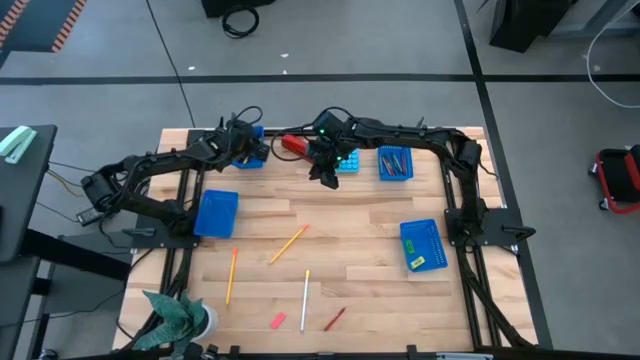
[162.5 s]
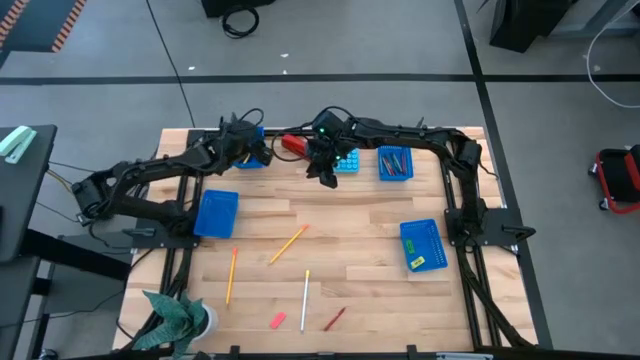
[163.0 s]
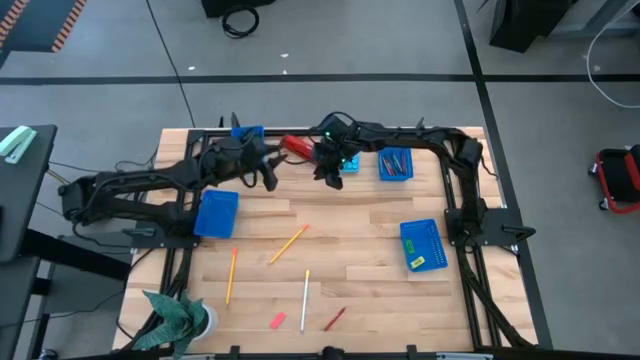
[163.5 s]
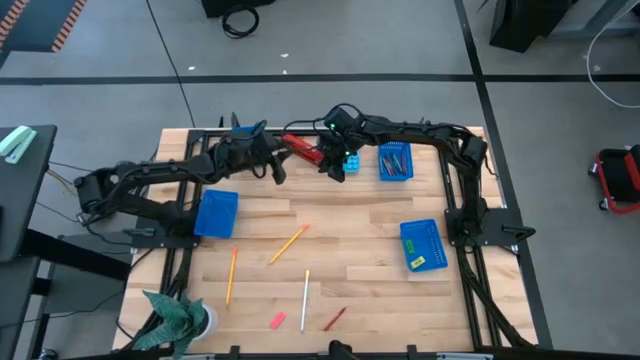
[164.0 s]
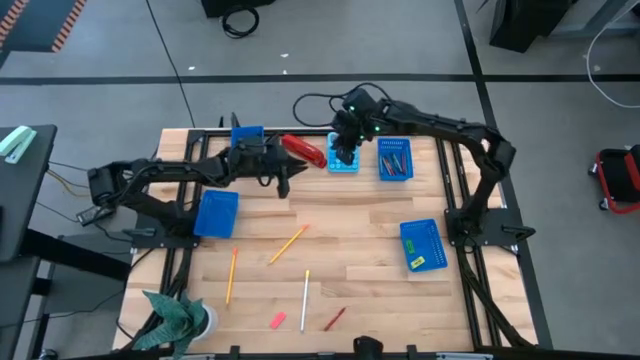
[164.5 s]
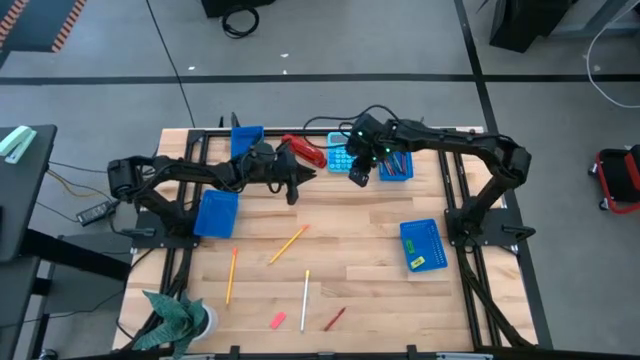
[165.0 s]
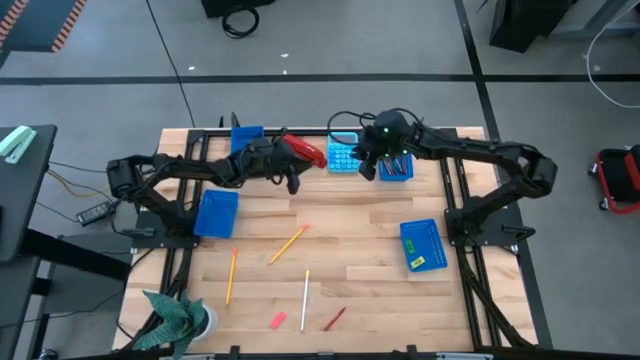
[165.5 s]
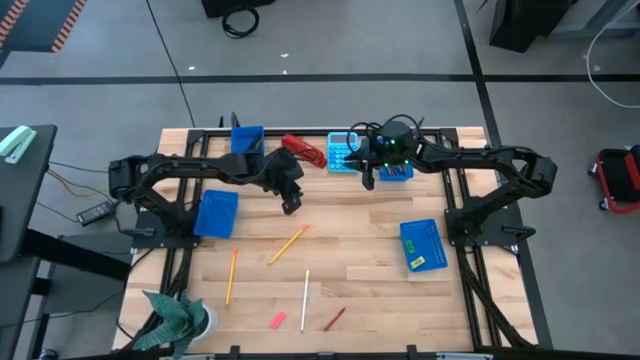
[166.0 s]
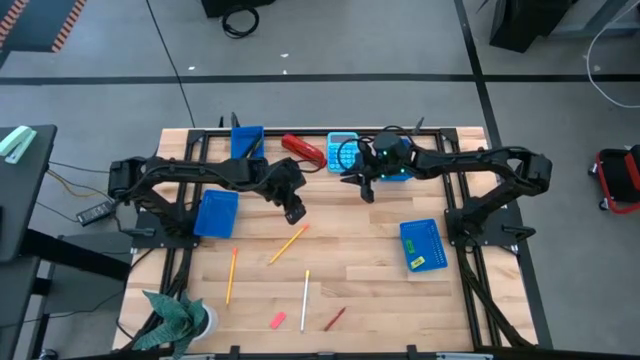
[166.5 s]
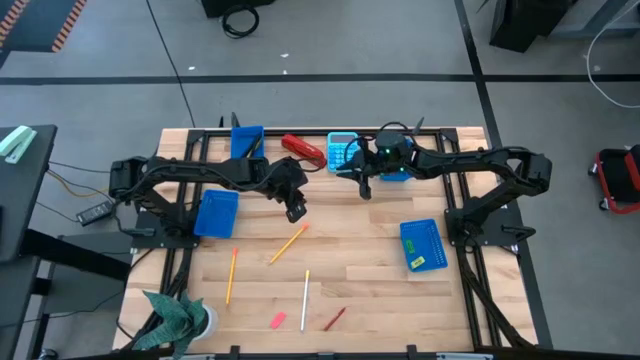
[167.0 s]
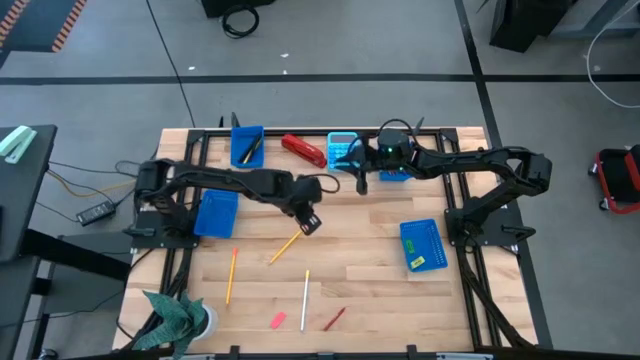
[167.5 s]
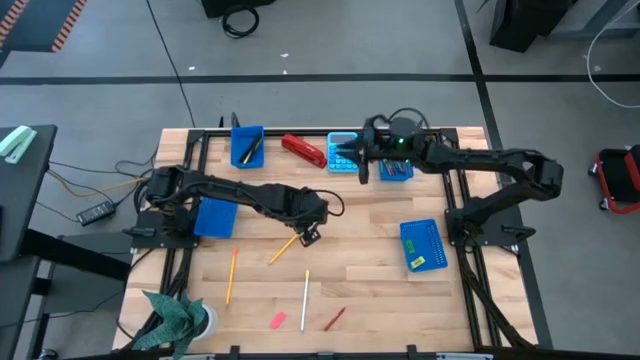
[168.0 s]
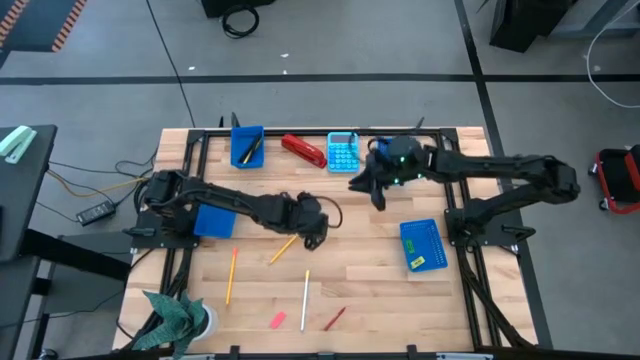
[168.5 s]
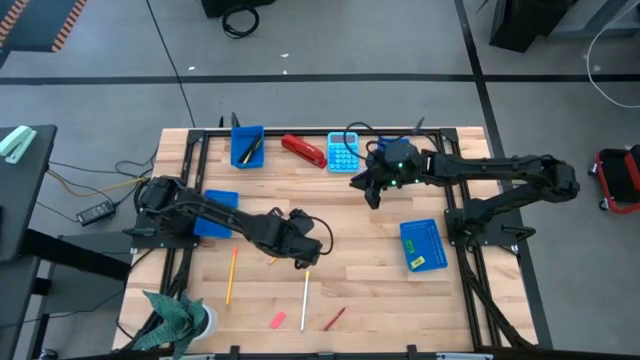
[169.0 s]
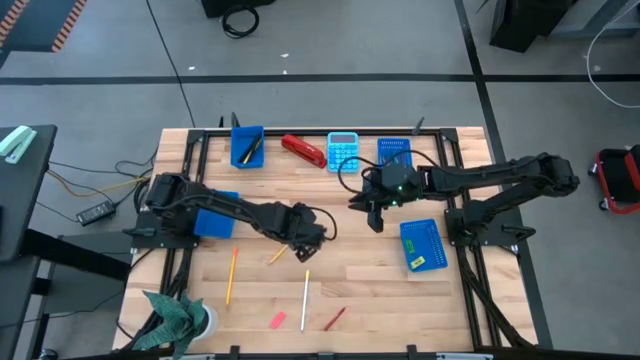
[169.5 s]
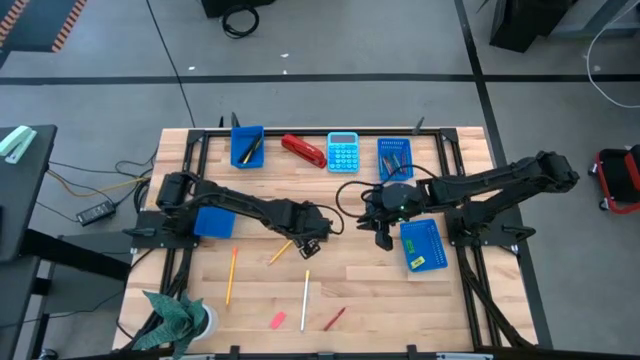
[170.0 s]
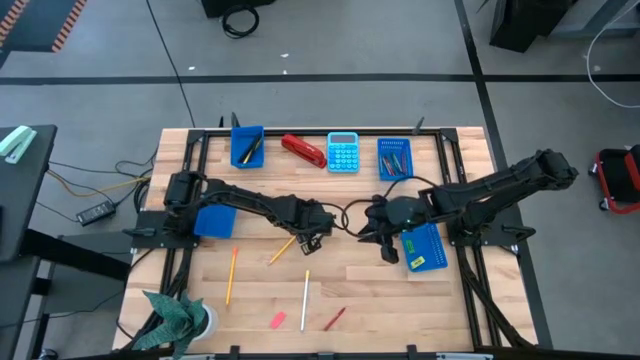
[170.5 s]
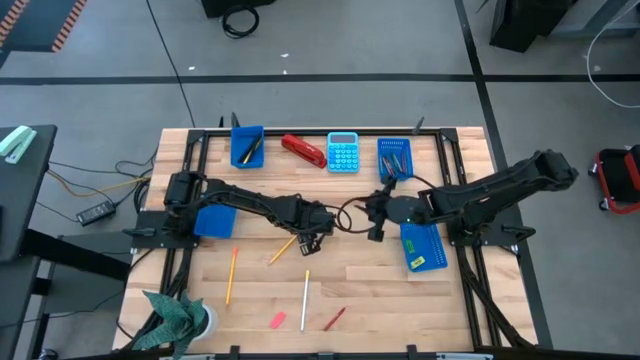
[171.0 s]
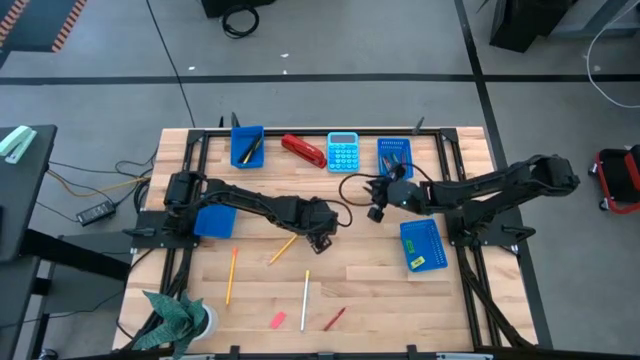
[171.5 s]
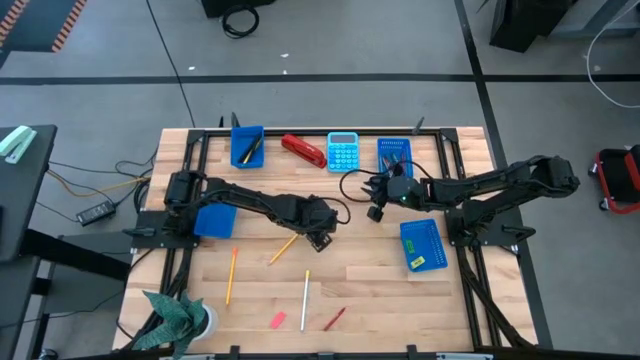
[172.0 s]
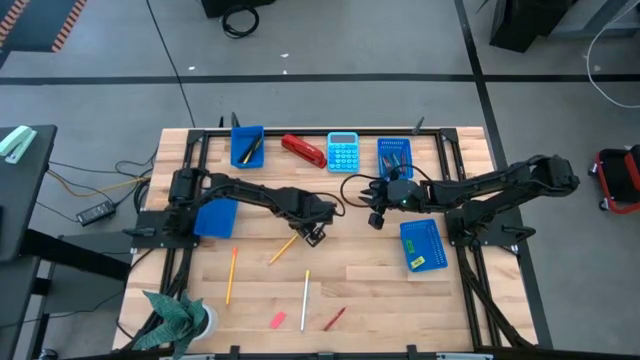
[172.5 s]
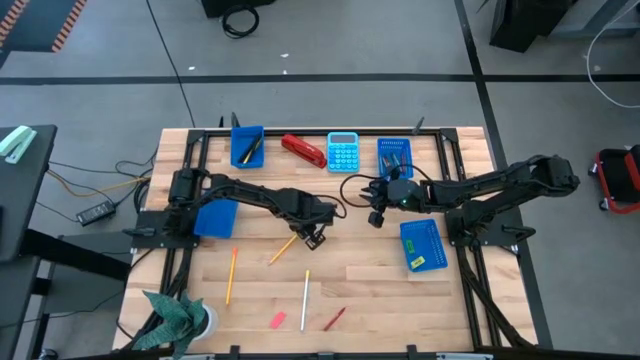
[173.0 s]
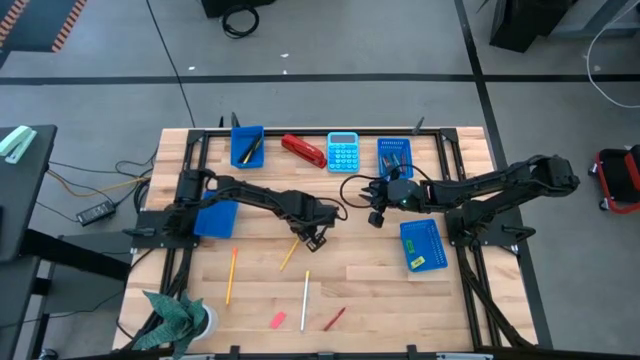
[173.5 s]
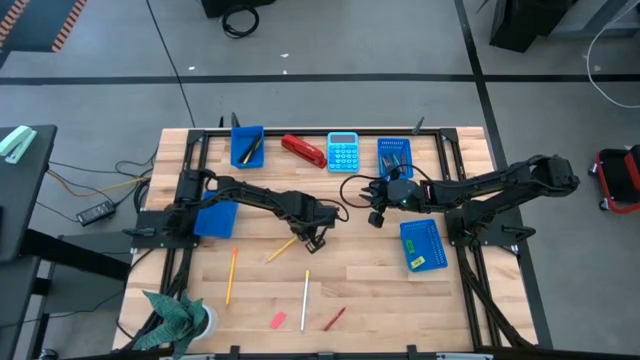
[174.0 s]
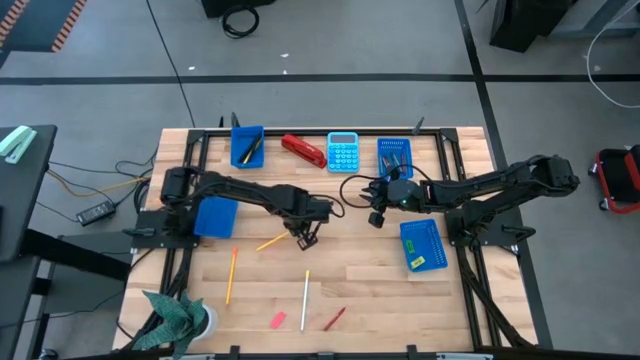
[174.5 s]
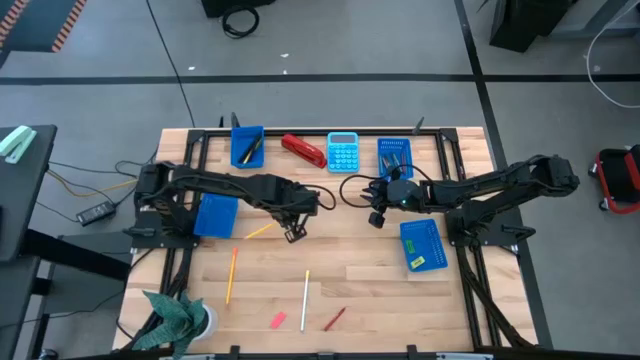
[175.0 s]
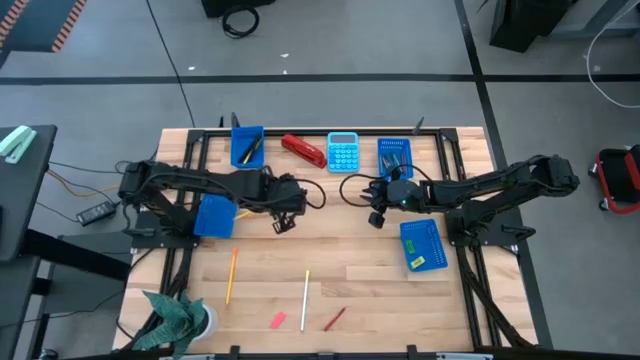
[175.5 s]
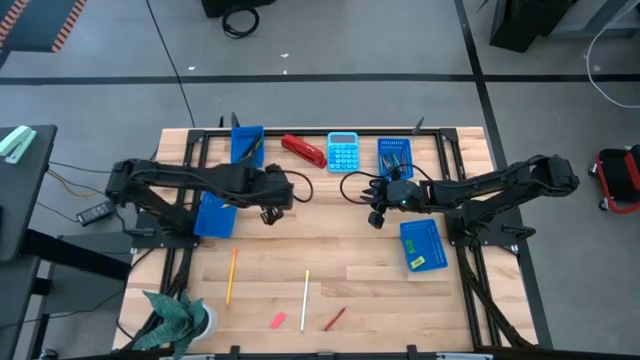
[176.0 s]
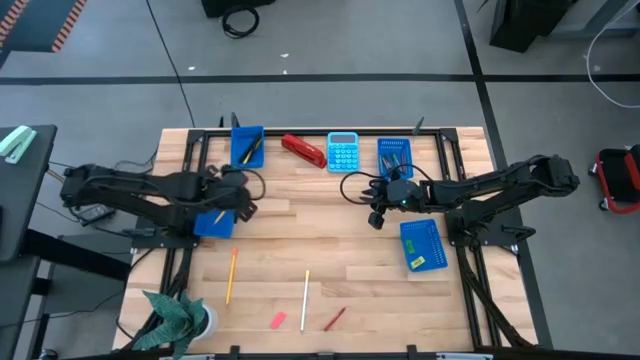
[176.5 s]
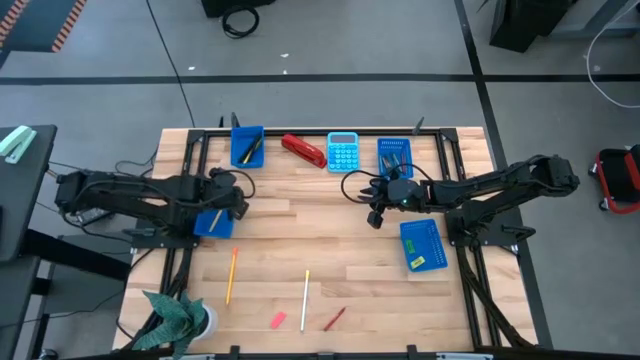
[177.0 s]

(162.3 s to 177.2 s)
Task: Sort crayons/erasers/pens/pencils in bins
Put the right yellow colored pencil into the bottom left bin

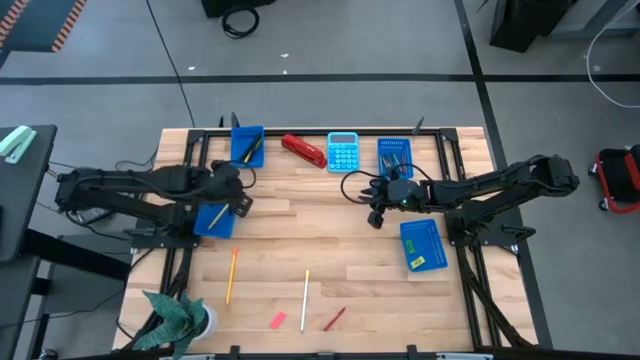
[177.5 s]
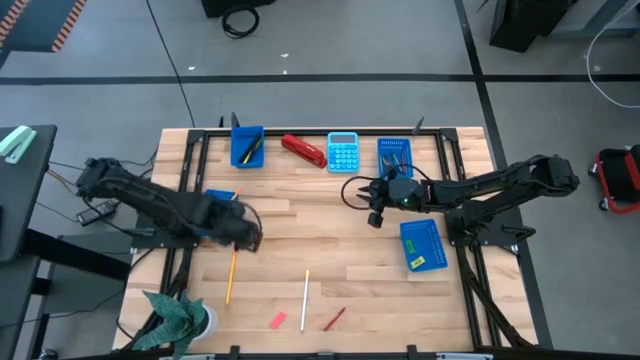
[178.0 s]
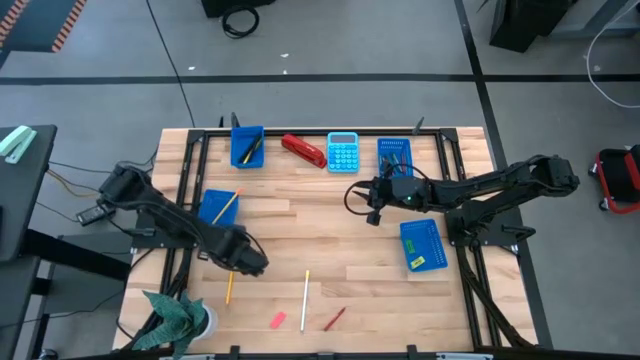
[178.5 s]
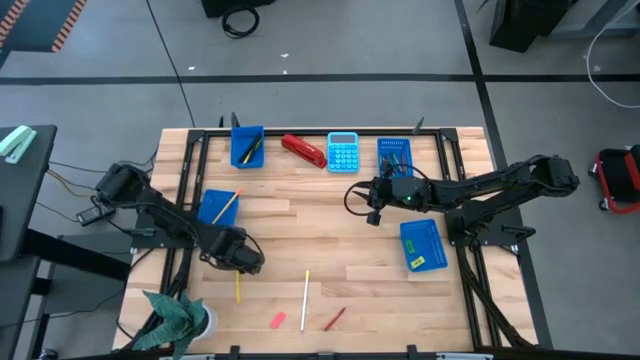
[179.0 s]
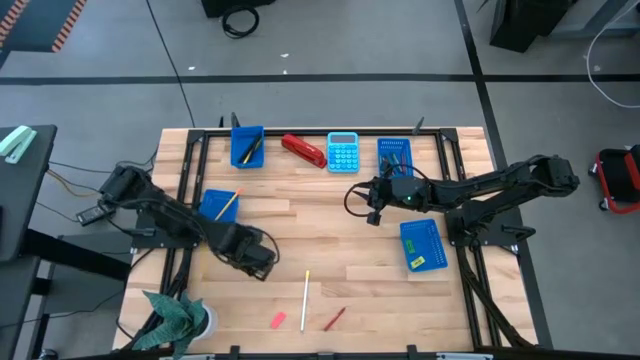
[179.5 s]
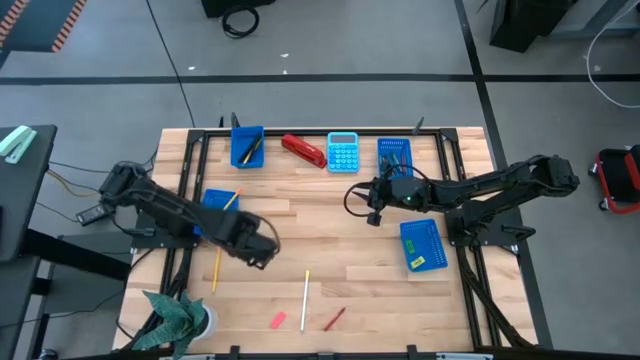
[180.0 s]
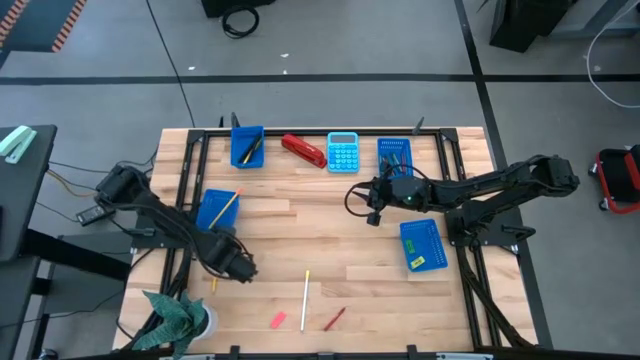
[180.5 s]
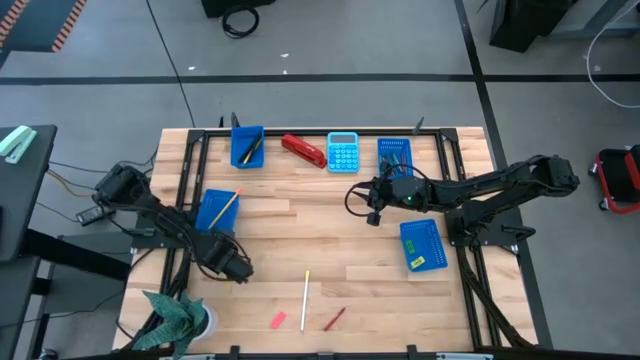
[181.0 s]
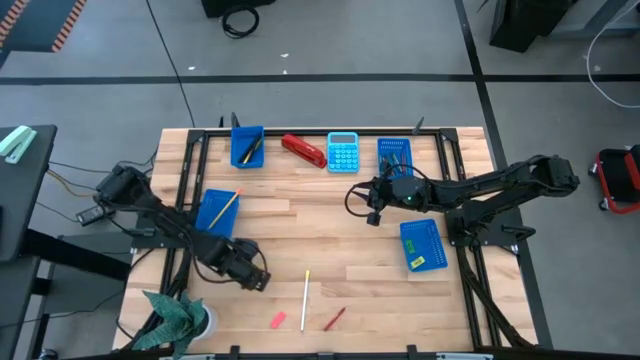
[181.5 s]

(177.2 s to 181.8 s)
Put the yellow colored pencil into the bottom left bin

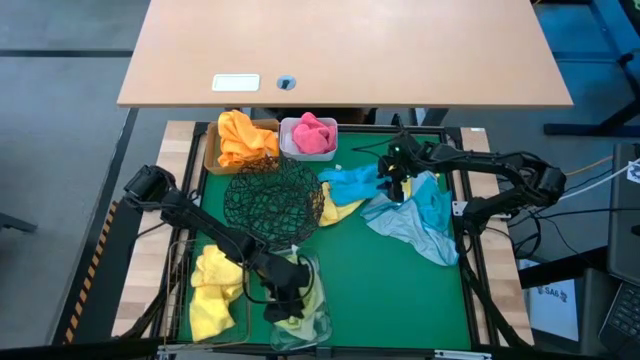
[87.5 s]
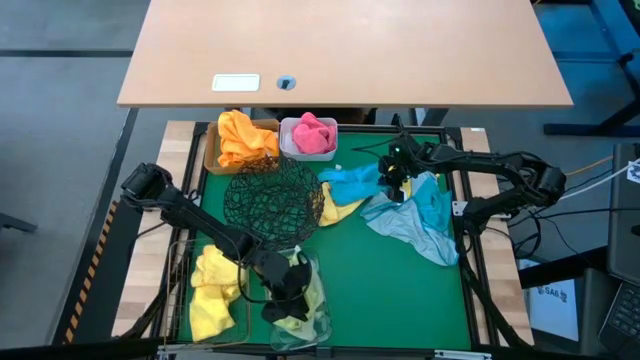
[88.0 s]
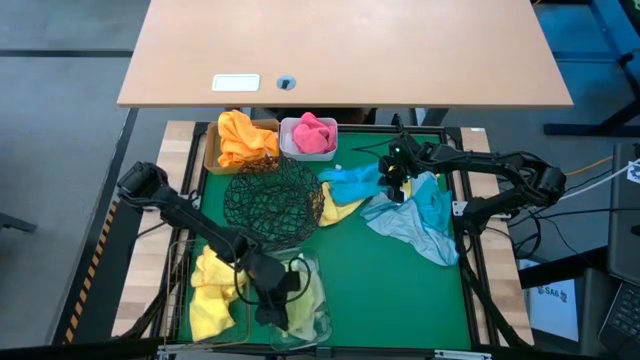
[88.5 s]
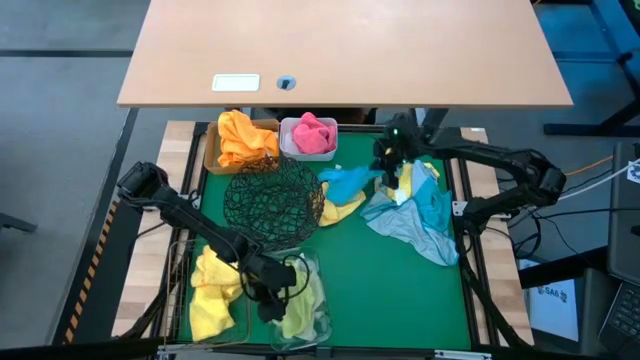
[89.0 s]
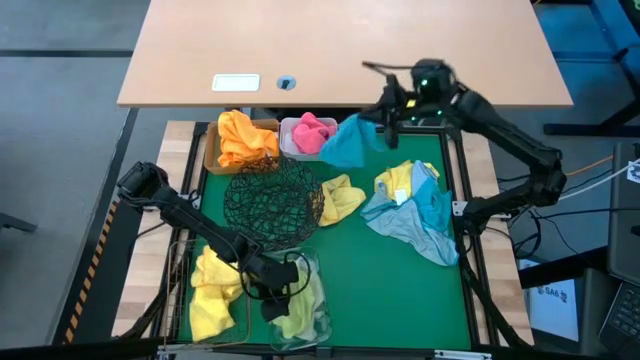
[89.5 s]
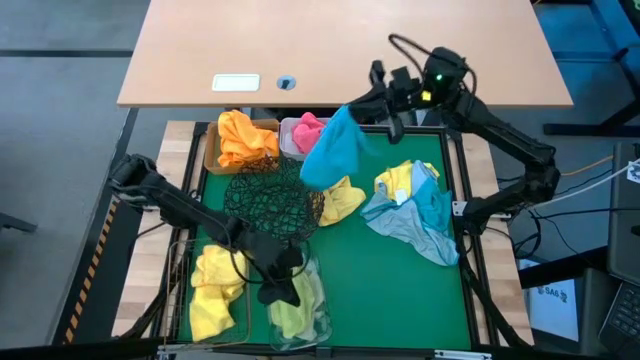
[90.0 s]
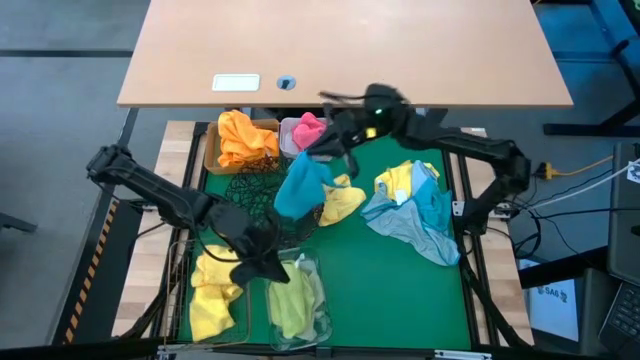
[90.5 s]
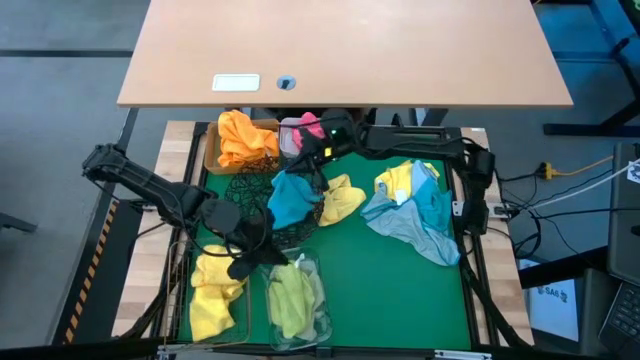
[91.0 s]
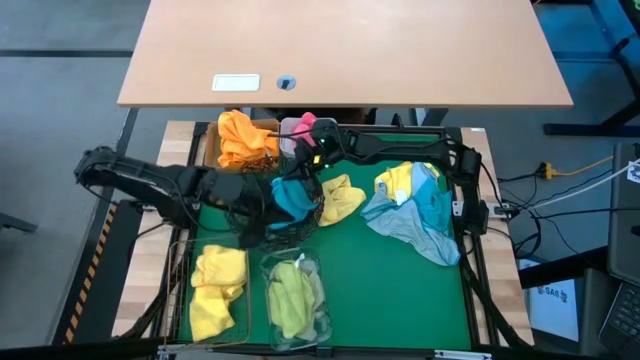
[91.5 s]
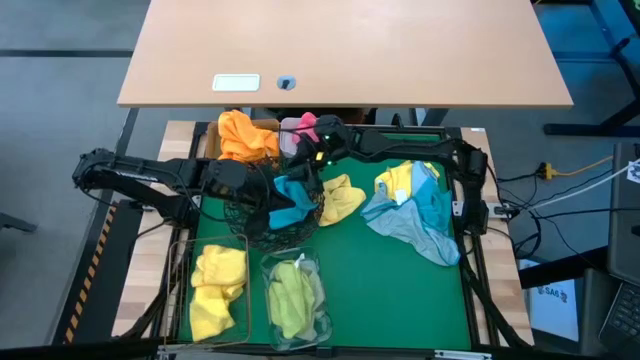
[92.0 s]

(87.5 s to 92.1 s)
Task: Sort microfiber towel by color & place in baskets
Put the light blue microfiber towel into the mesh basket
